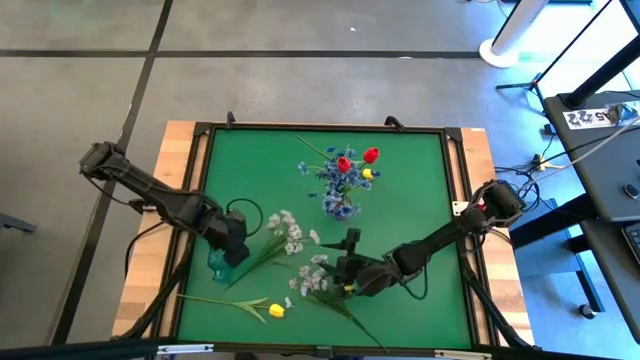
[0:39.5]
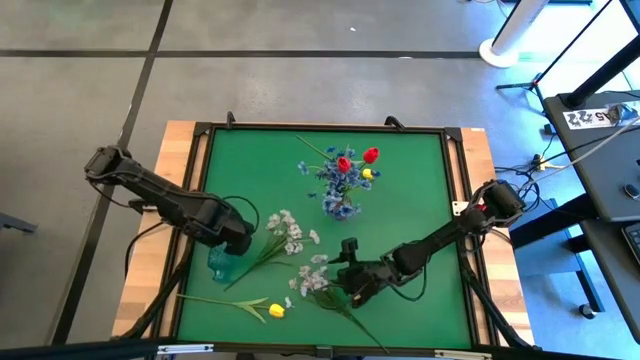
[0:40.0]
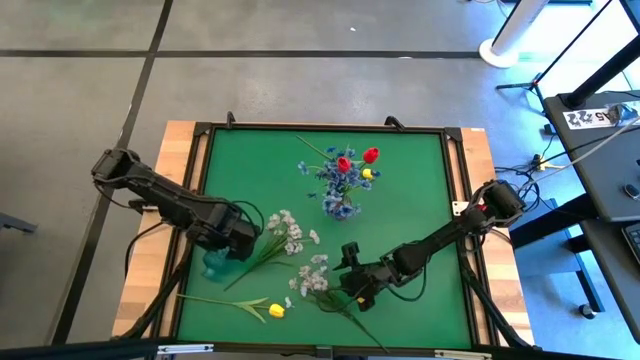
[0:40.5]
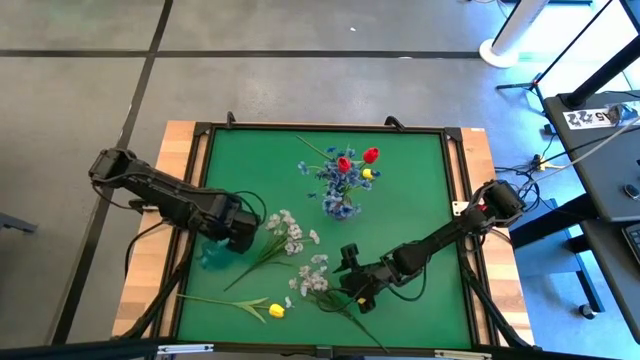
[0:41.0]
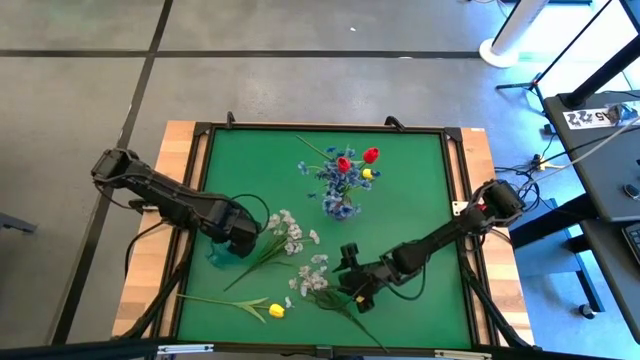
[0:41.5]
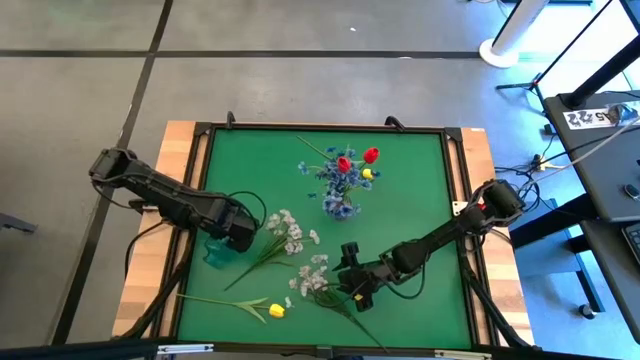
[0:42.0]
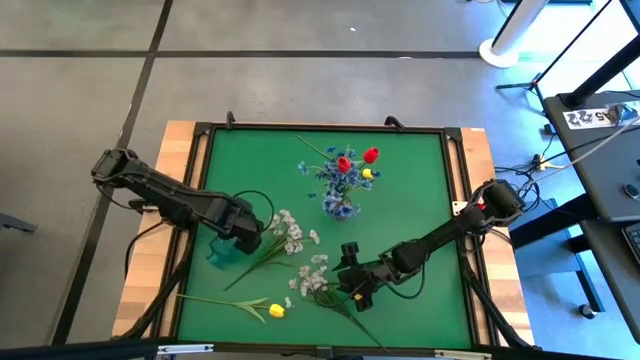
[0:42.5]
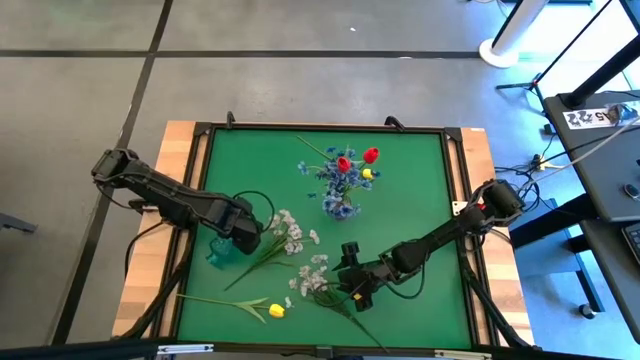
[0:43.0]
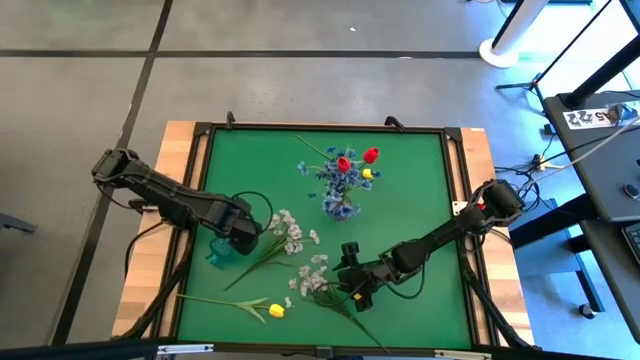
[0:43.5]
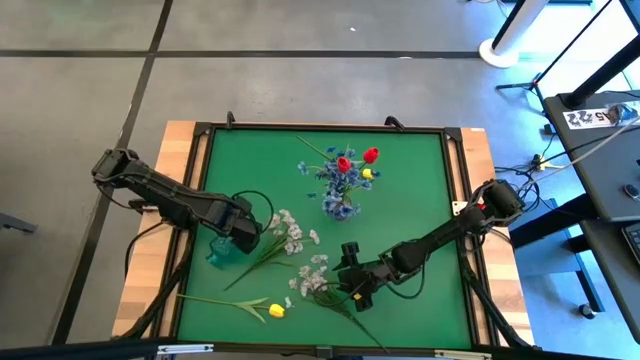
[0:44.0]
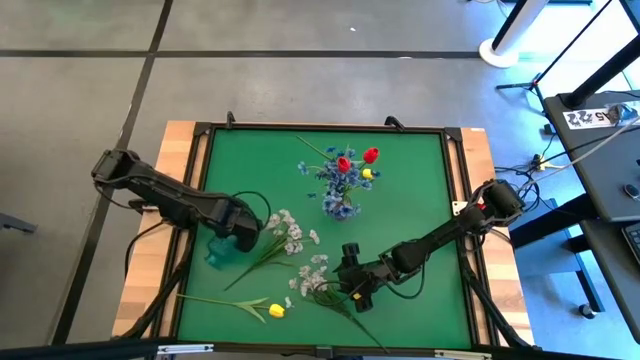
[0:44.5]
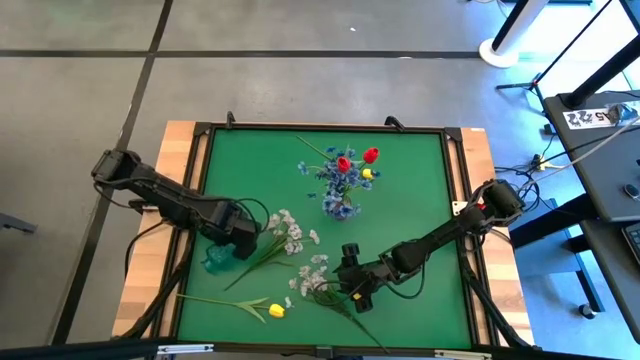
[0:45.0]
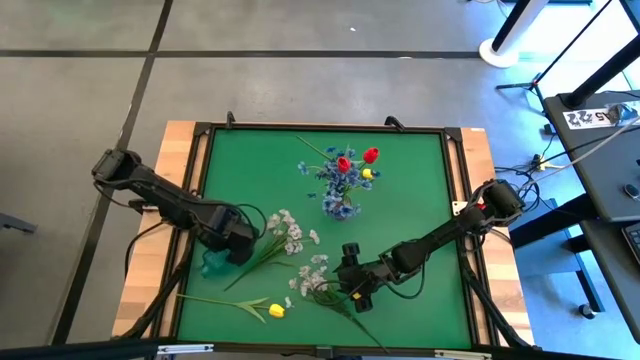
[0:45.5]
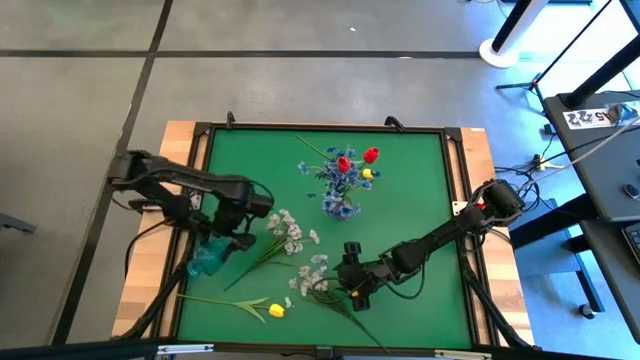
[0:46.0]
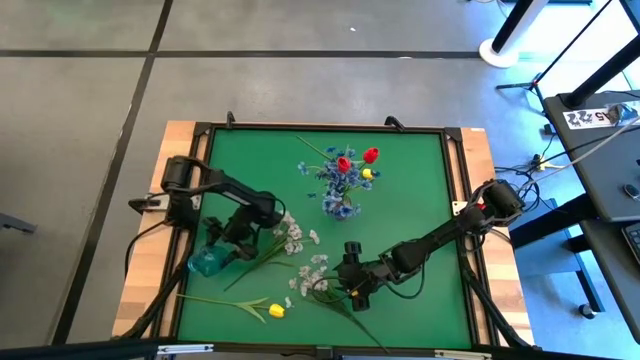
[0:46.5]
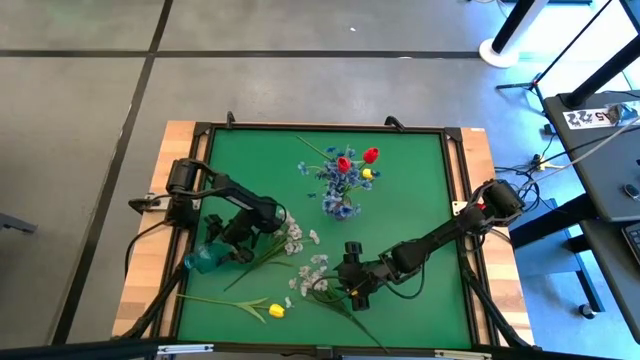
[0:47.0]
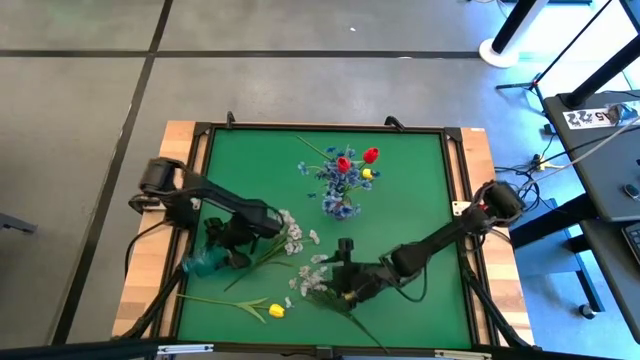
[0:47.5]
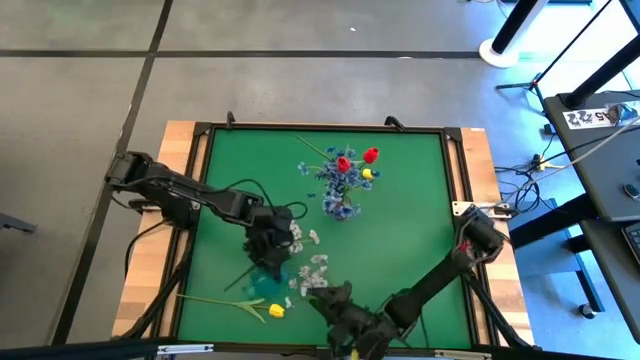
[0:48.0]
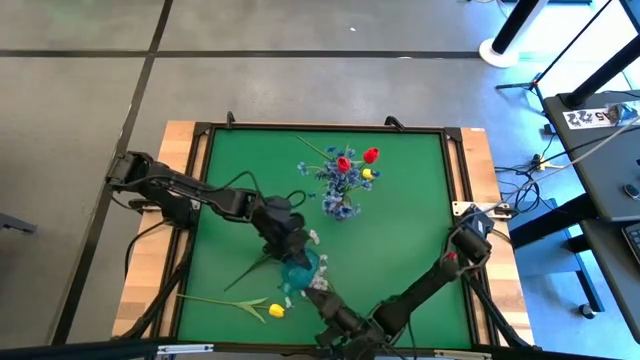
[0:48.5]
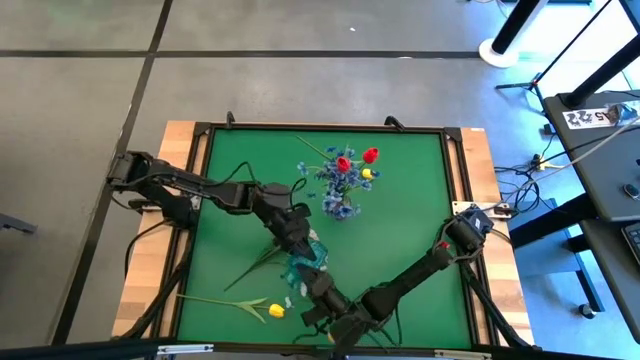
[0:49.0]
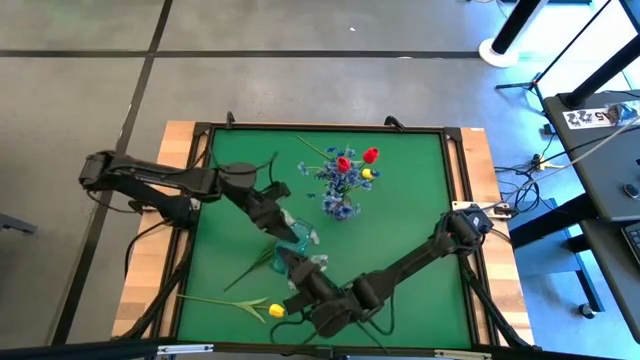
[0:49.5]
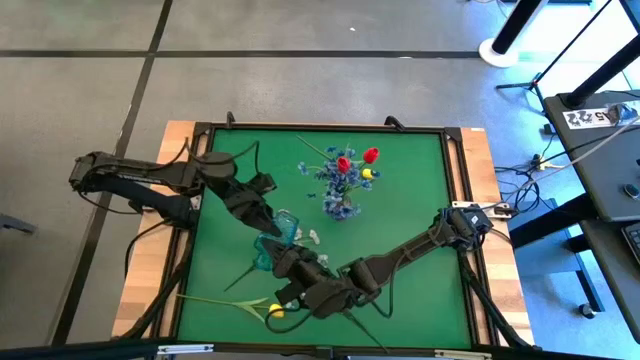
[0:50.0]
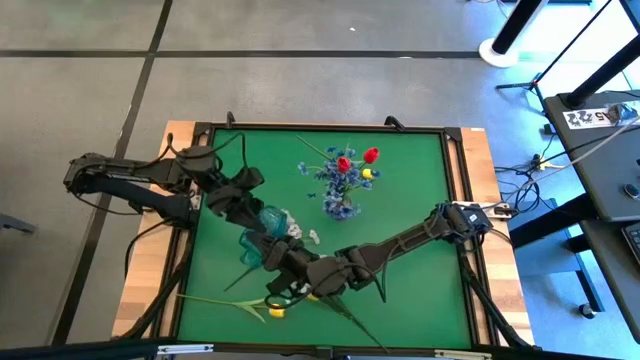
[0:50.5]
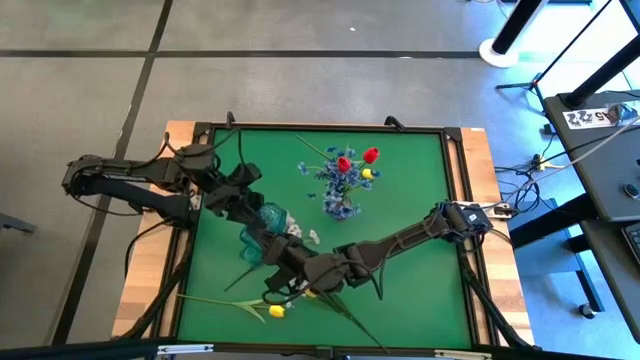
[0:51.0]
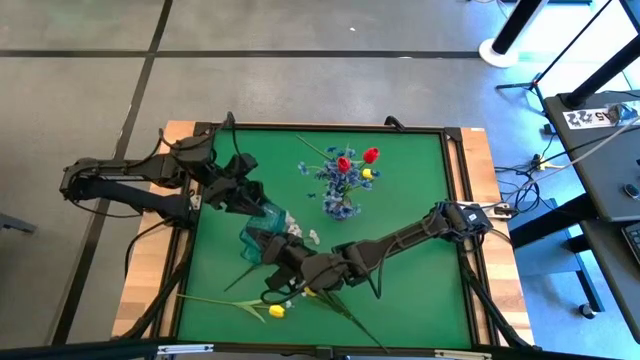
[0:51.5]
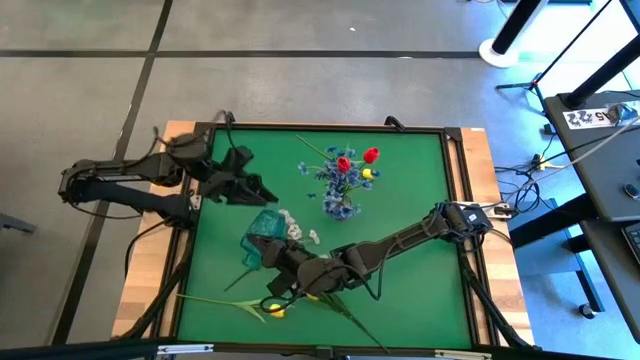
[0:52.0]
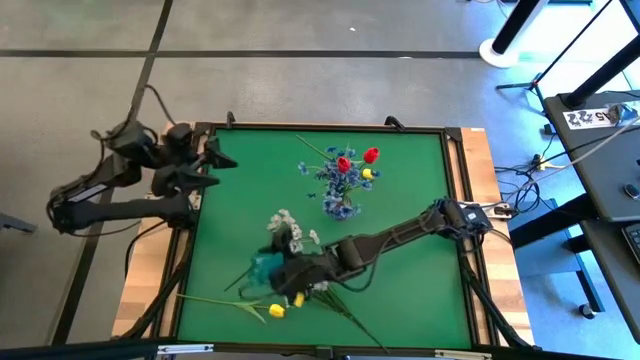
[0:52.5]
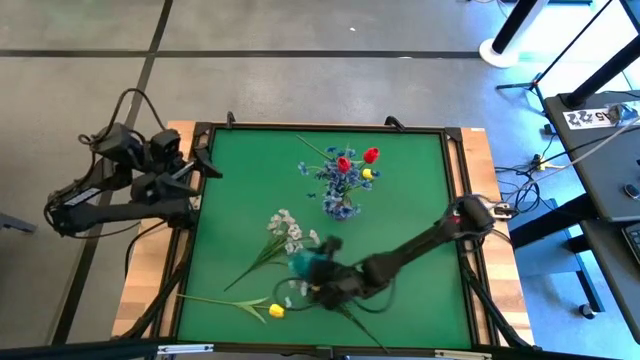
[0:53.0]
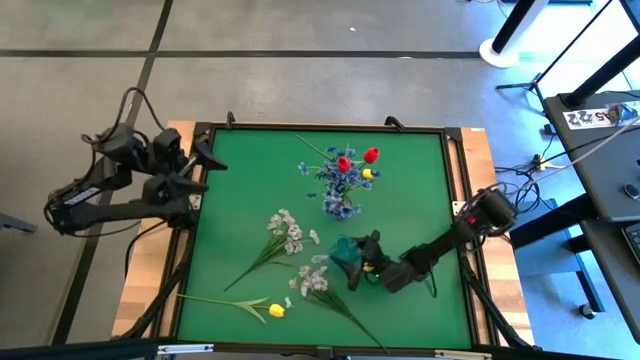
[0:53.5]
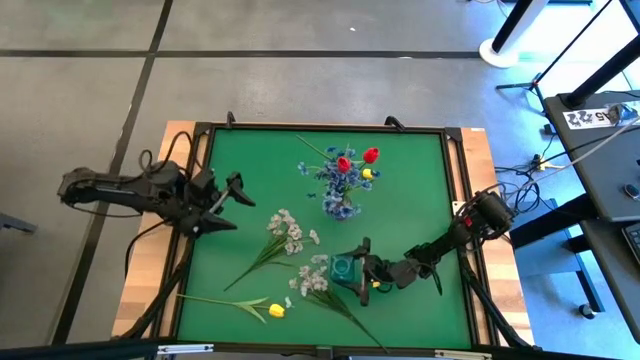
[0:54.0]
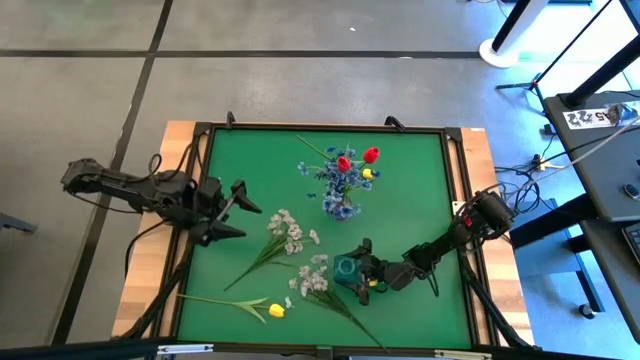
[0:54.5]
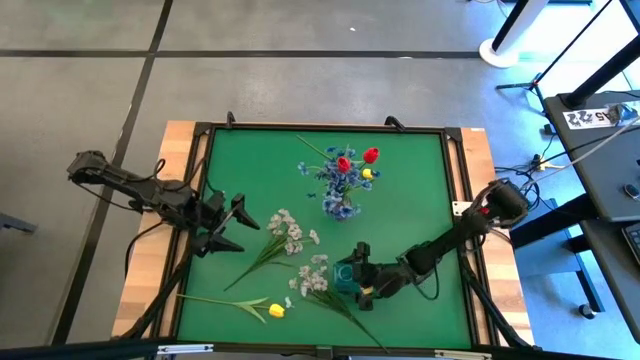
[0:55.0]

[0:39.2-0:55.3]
Task: Sort flowers into vase by color
Move the blue vase to the bottom of the table

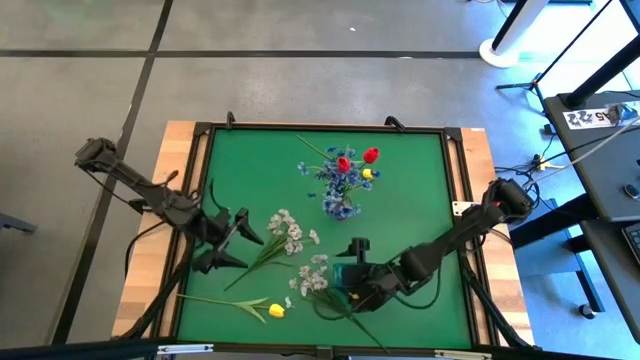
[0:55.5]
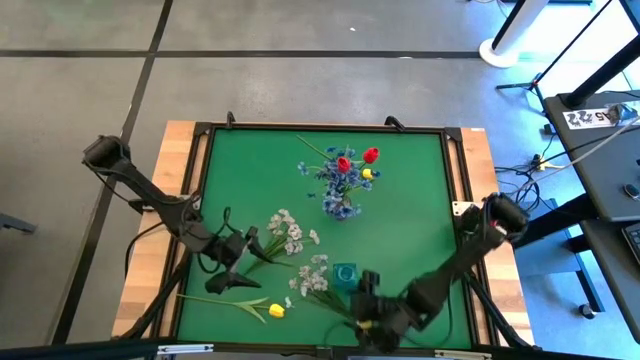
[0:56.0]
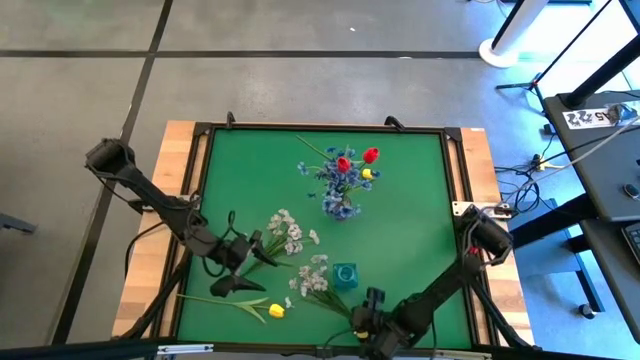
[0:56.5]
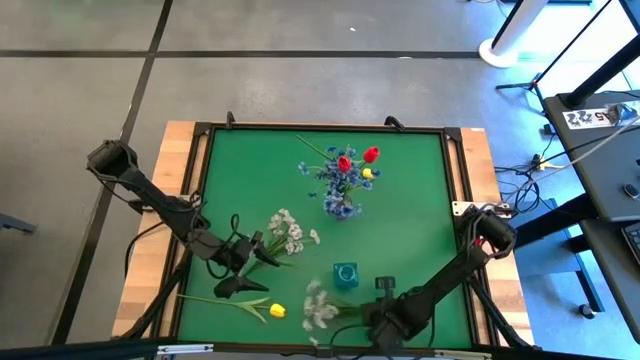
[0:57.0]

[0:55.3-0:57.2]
Put the bottom white flowers into the blue vase

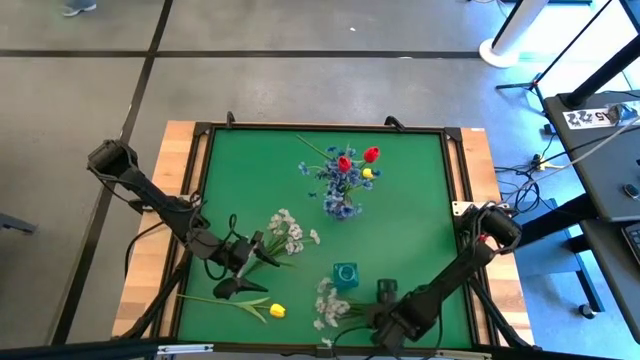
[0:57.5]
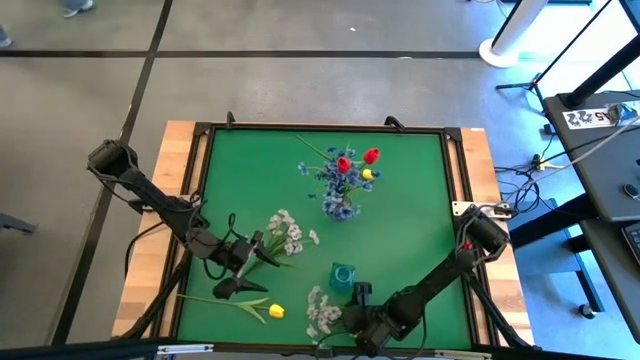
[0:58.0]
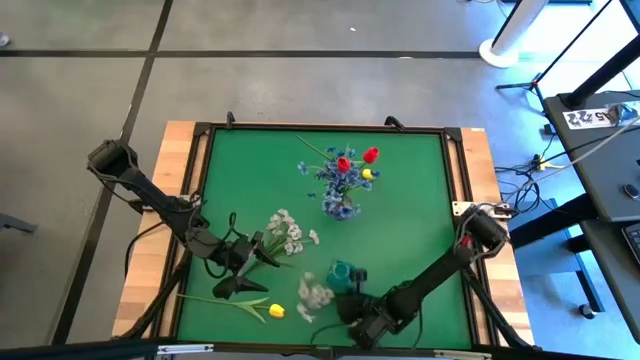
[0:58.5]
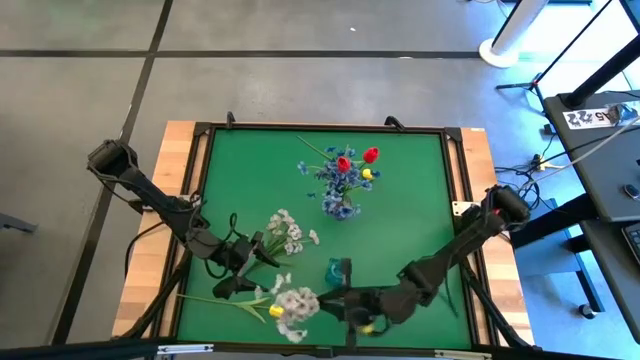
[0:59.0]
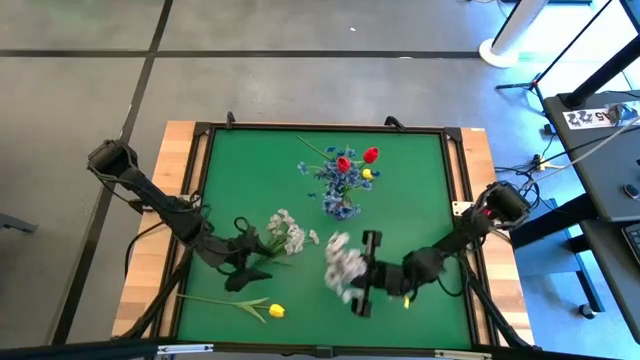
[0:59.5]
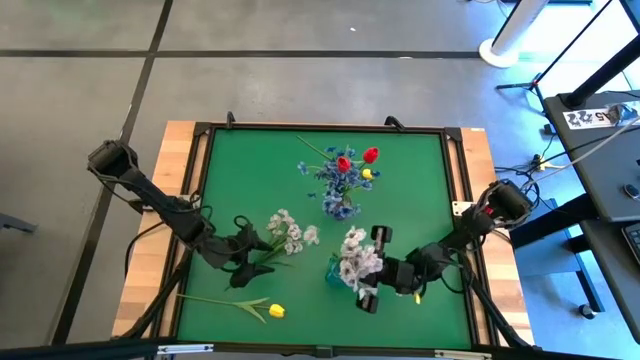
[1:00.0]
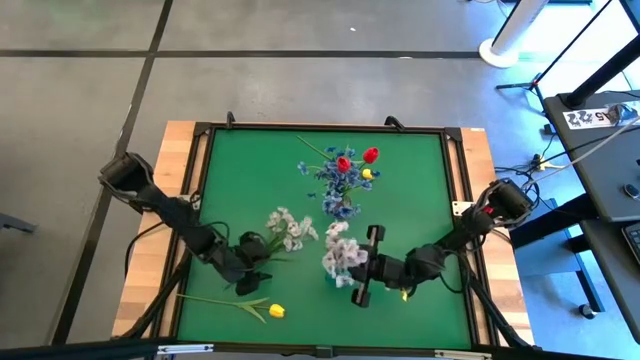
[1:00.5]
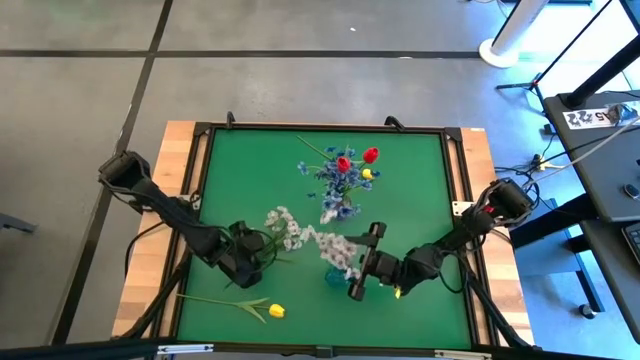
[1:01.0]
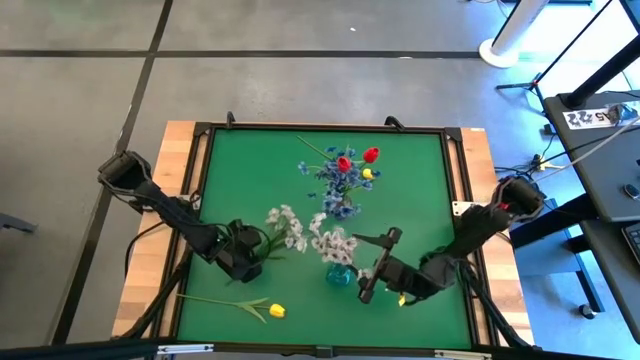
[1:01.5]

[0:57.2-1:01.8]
Put the bottom white flowers into the blue vase
